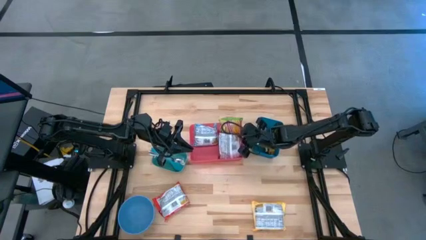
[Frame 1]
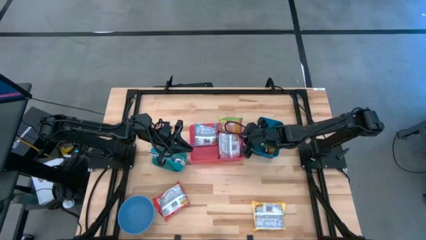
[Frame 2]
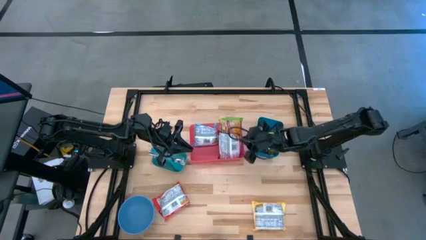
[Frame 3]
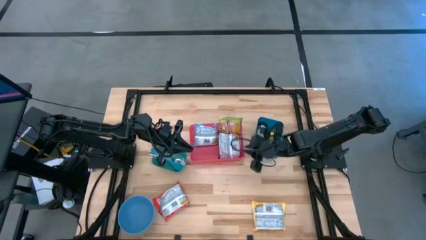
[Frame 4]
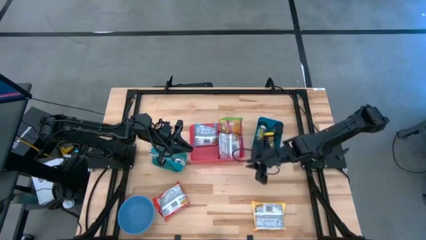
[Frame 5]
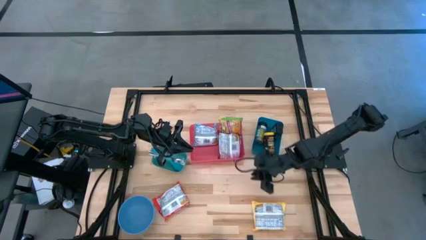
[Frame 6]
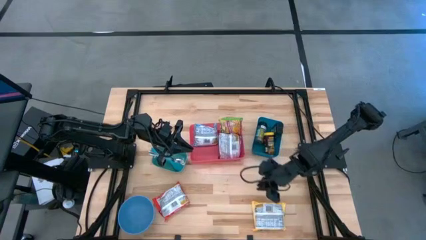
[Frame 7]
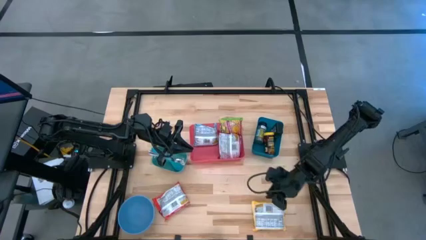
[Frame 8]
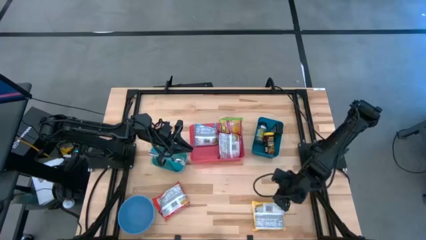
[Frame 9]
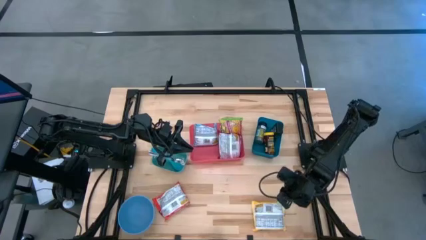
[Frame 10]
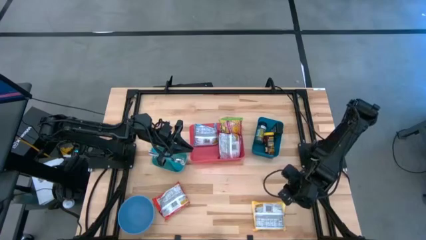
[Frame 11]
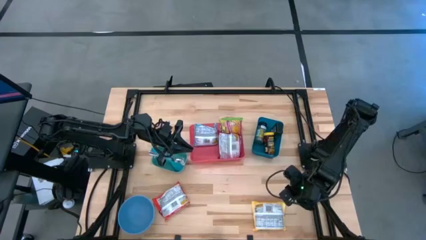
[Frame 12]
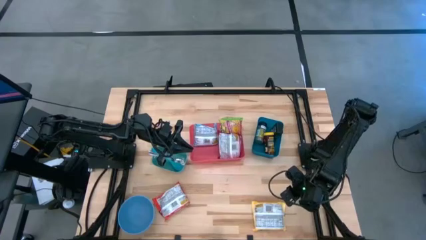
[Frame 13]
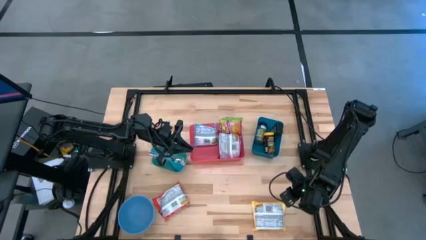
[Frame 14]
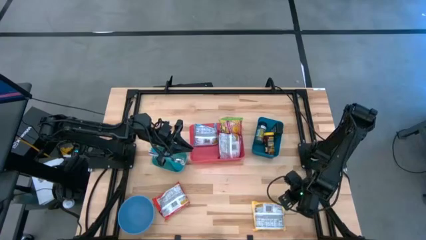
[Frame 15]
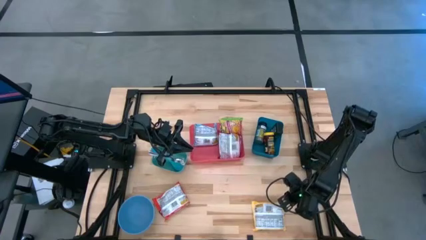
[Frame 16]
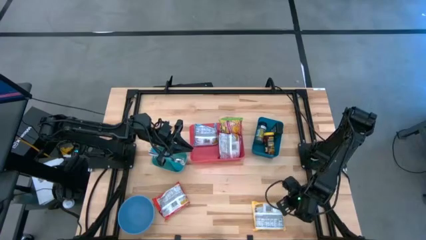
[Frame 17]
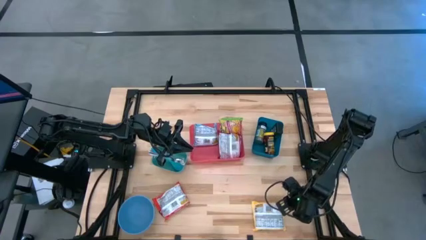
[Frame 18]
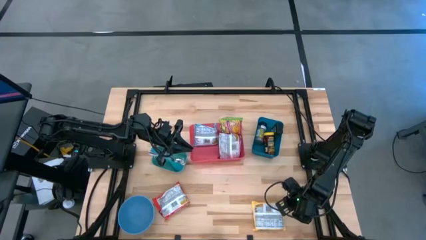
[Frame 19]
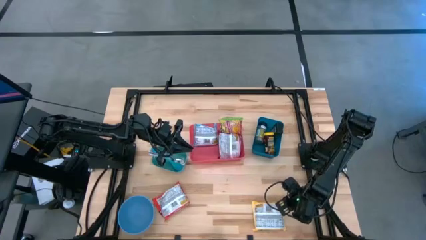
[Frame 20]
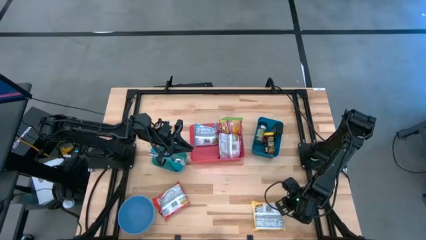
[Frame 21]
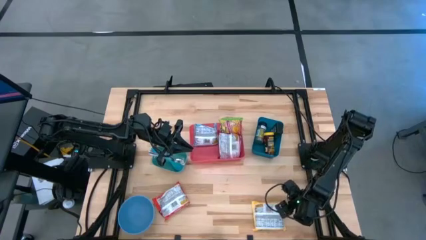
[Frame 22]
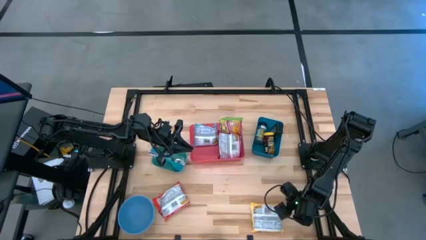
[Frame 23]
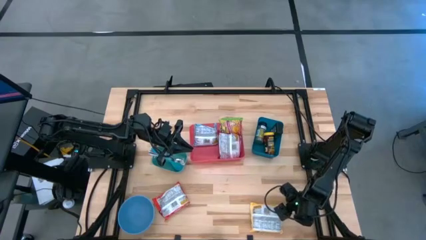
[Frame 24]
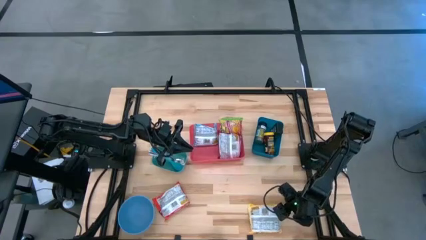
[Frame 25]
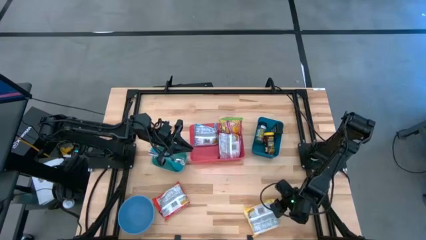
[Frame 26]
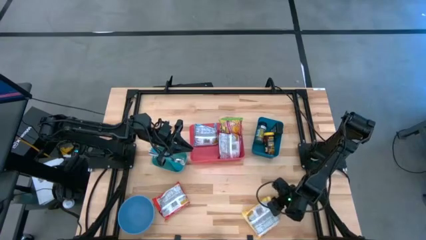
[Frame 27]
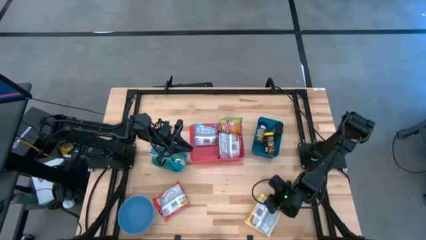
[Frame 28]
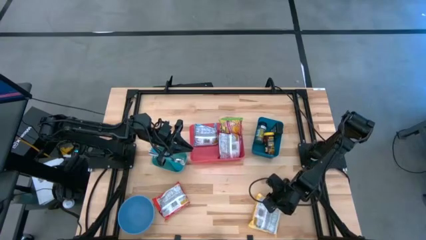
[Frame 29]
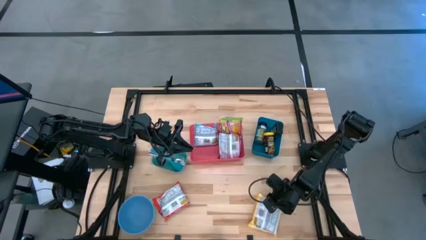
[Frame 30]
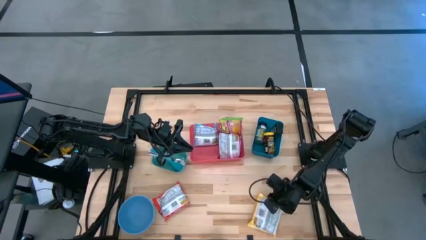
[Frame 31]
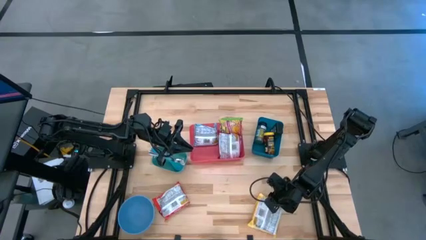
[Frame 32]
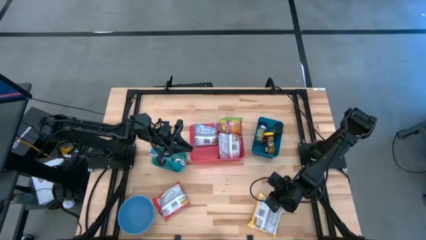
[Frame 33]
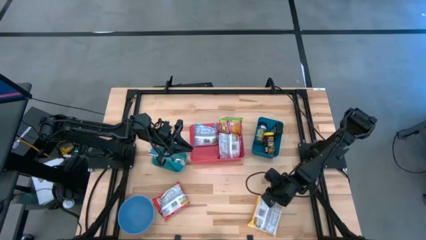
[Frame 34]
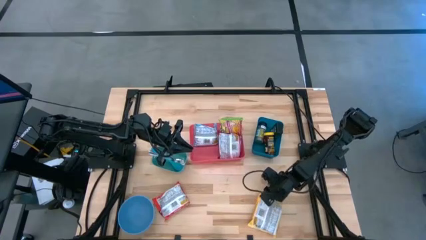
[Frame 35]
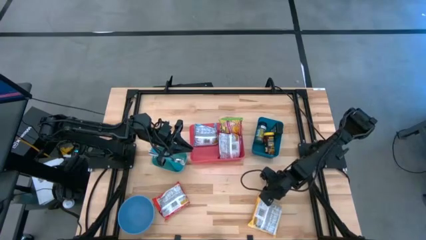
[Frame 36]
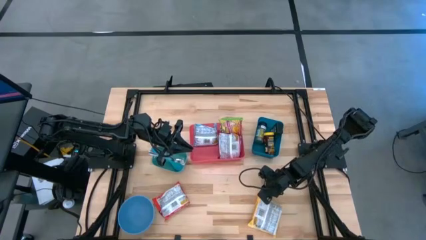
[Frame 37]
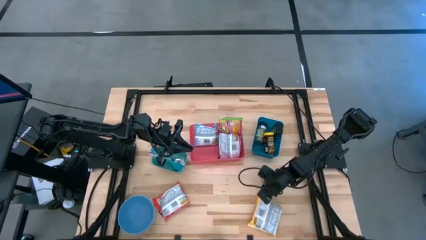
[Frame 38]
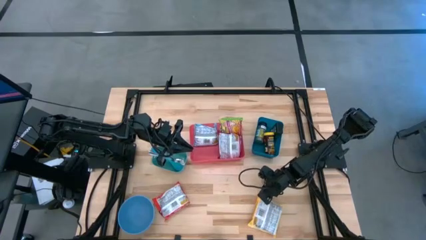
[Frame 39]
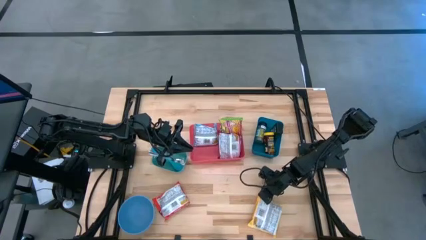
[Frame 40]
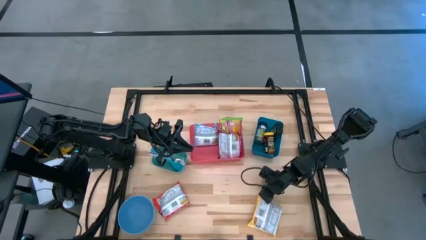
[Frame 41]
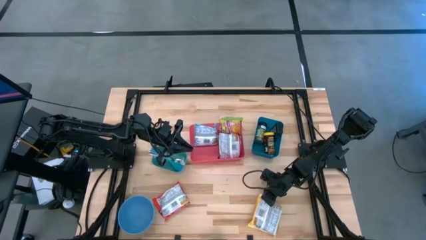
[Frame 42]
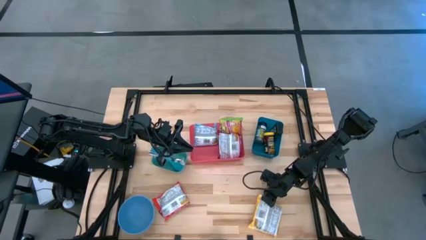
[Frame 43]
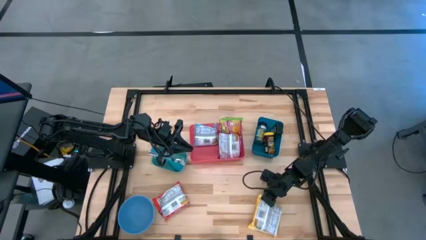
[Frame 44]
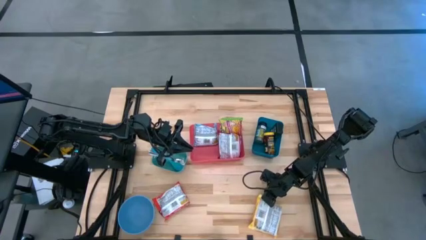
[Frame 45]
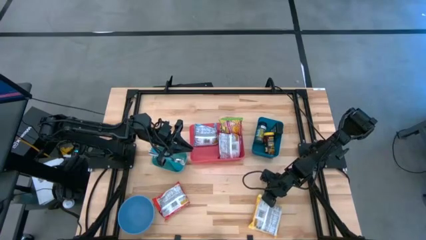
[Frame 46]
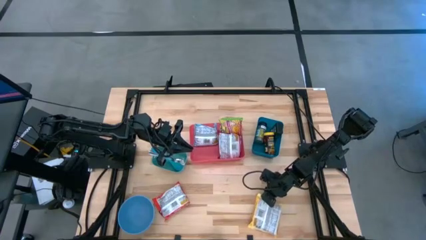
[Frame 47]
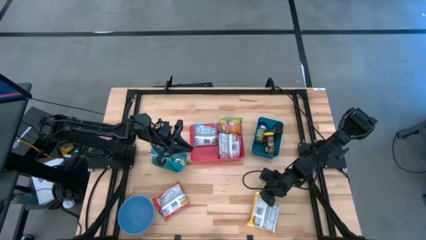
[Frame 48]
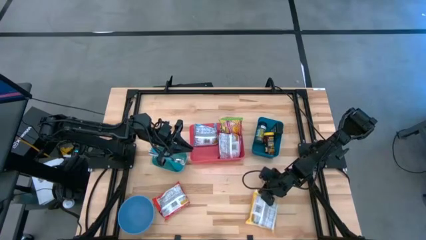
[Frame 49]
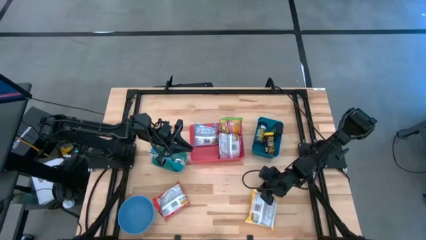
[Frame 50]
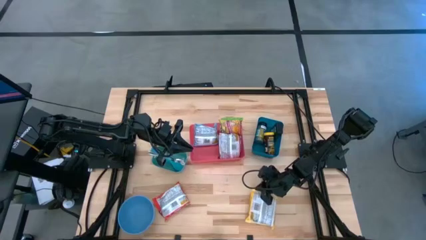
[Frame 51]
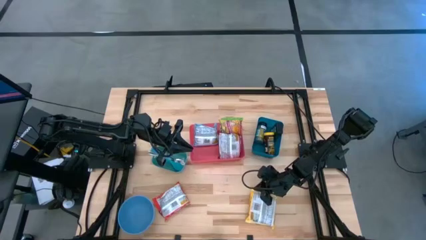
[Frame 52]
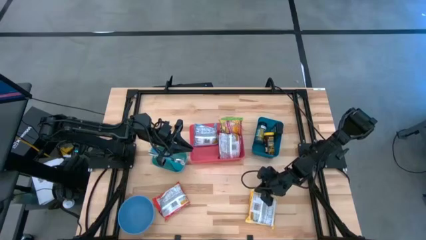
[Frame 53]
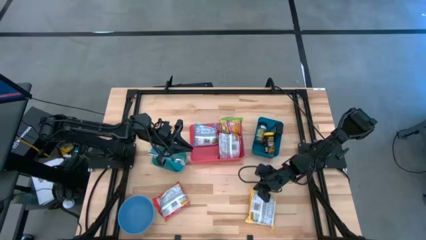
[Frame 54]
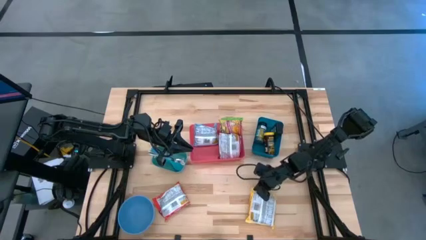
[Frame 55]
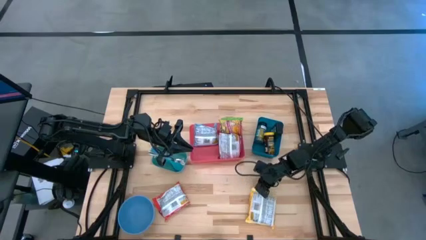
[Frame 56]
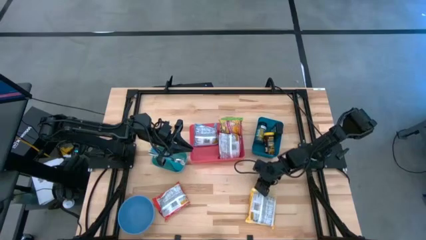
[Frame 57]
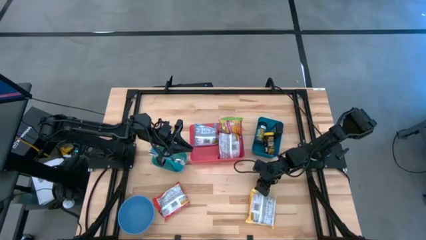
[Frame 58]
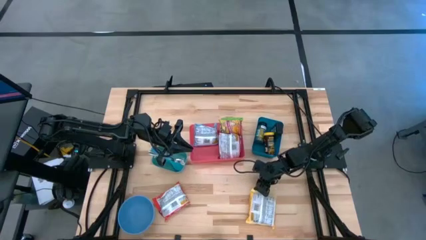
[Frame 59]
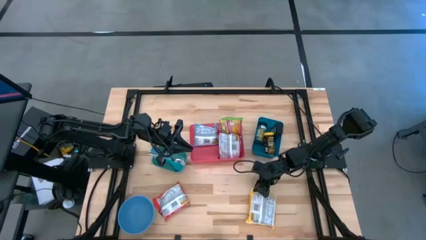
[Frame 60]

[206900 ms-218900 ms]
Task: Pick & Place Food Item
Put the yellow noodle pack into the red bin

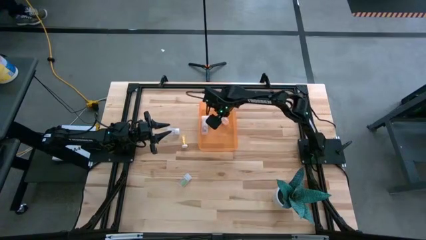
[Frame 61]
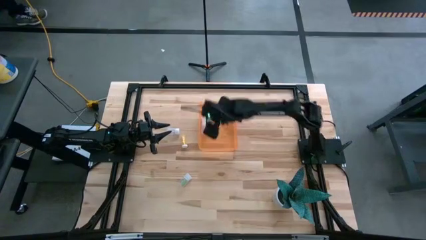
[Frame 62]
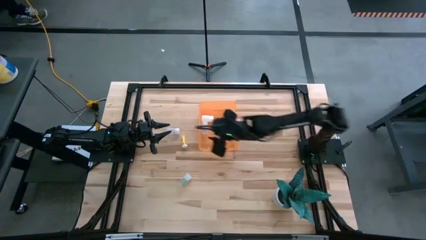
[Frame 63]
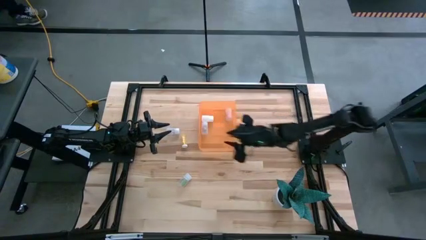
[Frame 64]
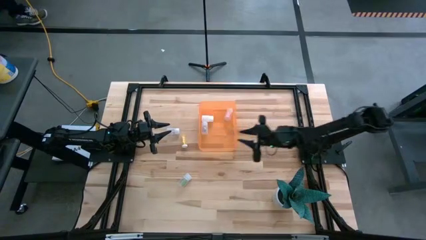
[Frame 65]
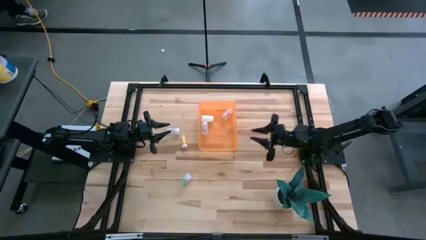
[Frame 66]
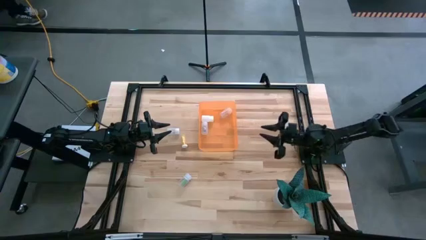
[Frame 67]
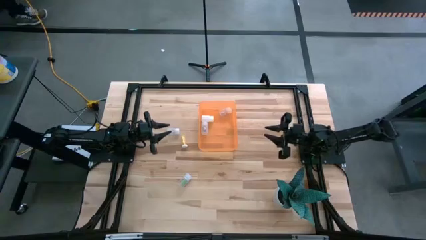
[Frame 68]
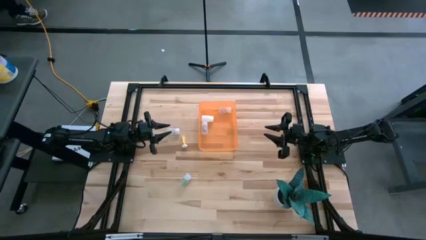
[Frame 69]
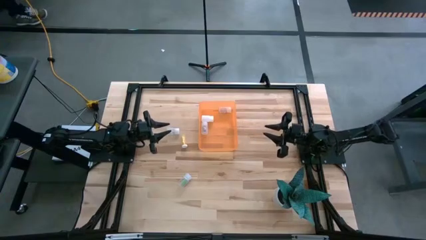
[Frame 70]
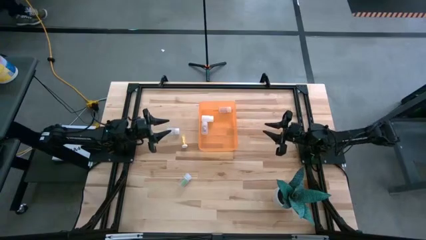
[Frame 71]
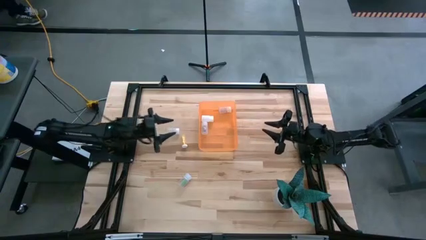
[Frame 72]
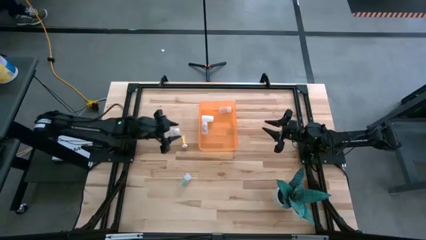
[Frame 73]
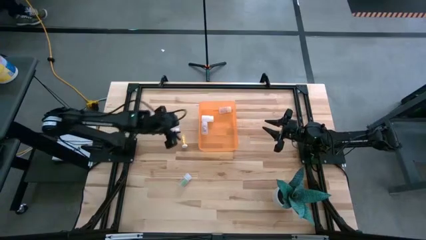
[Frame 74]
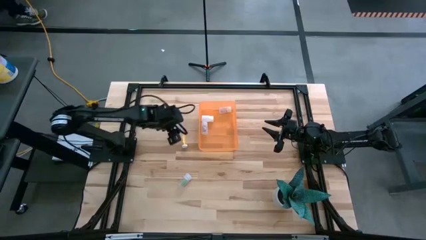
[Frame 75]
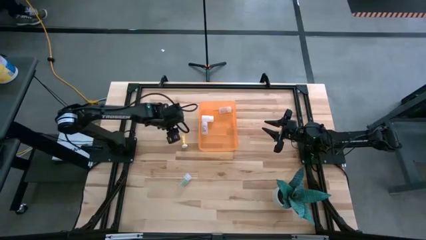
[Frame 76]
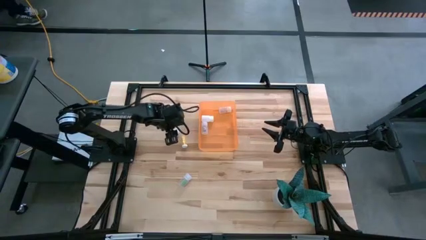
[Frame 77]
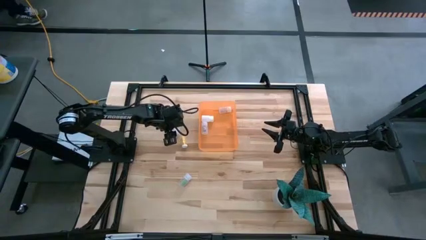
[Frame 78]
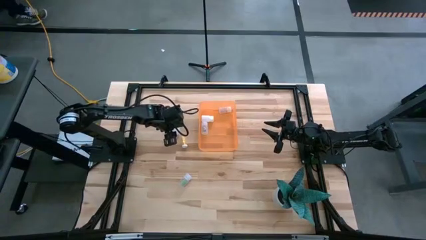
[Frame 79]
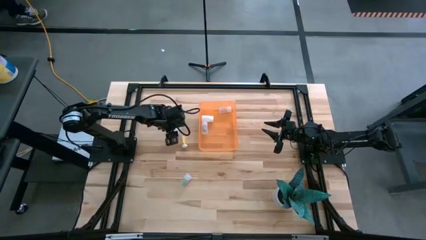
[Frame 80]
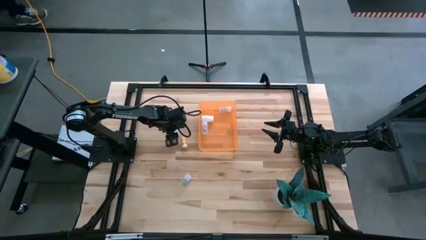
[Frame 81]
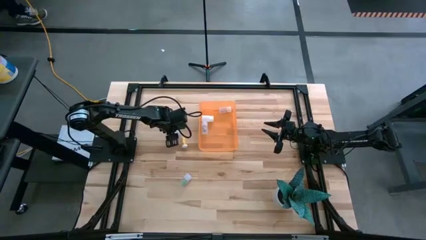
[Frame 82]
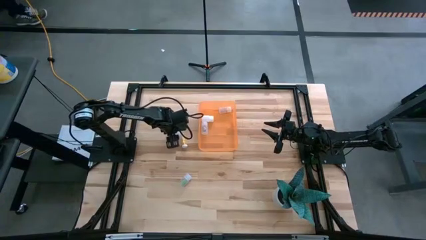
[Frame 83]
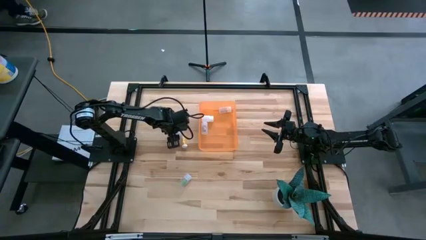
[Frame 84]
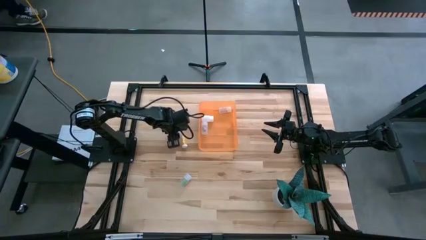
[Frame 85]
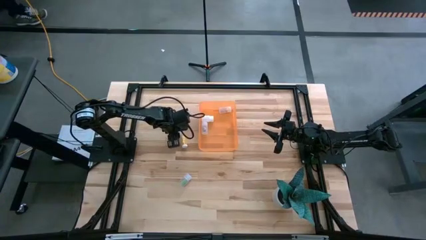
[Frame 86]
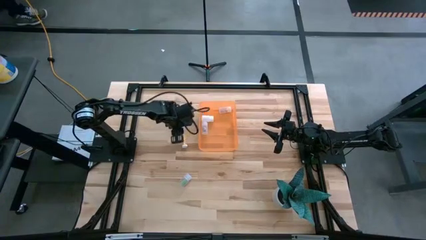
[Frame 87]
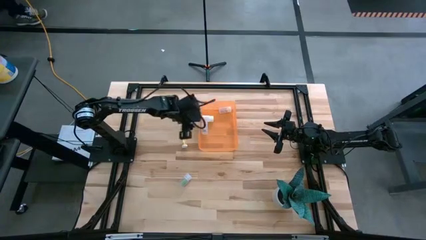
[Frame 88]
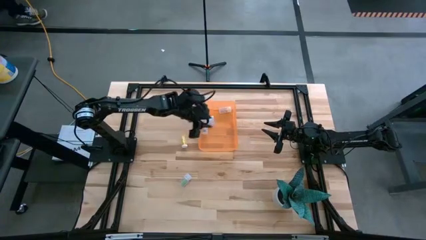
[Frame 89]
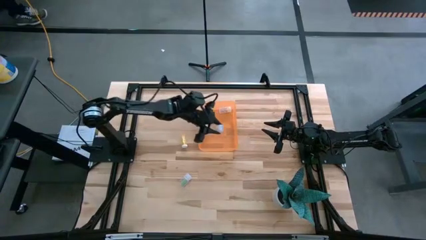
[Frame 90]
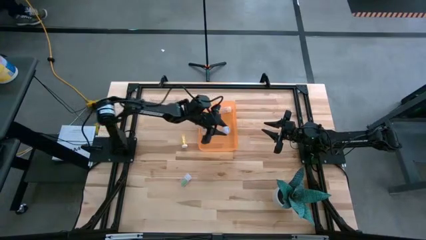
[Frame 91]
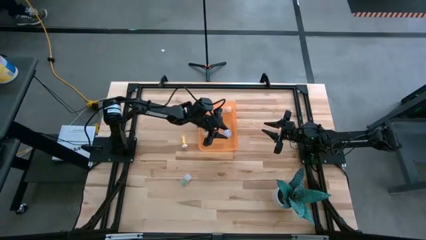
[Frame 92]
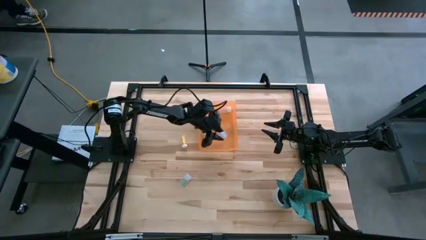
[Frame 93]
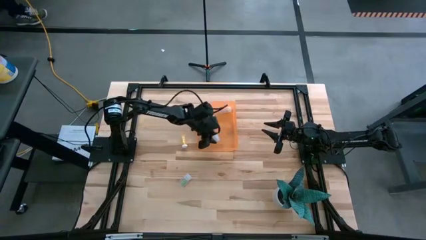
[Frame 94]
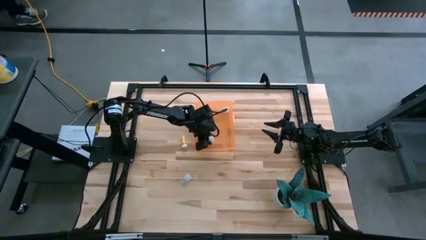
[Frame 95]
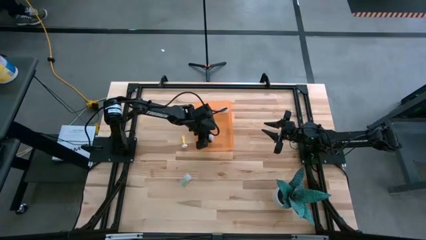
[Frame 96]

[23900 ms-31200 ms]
Task: Pick and place pill bottles into a basket
Put the transparent pill bottle into the orange bin
